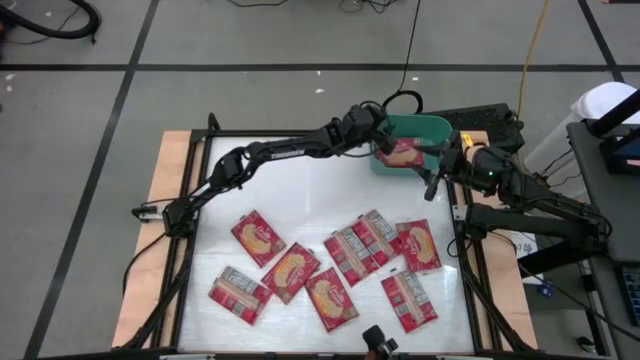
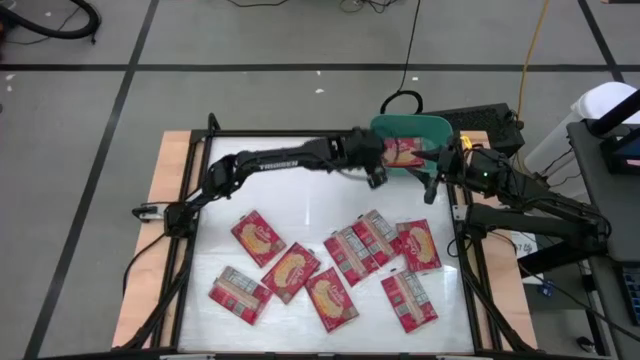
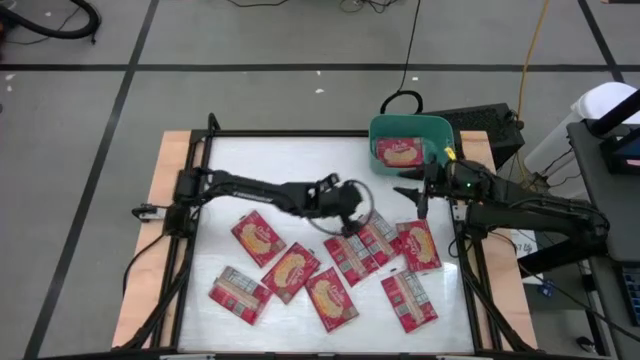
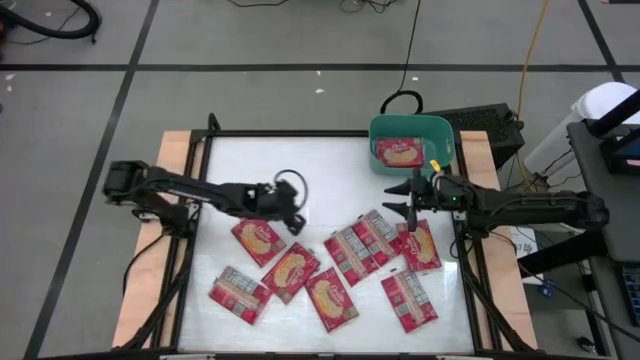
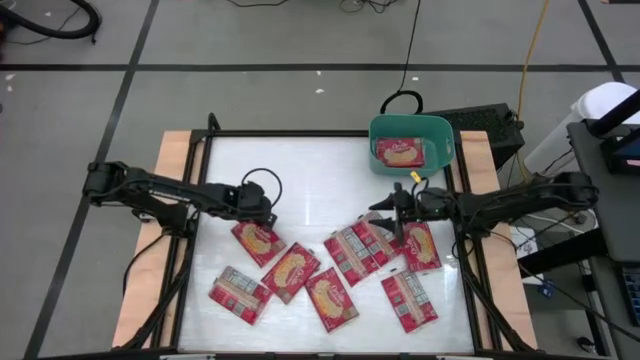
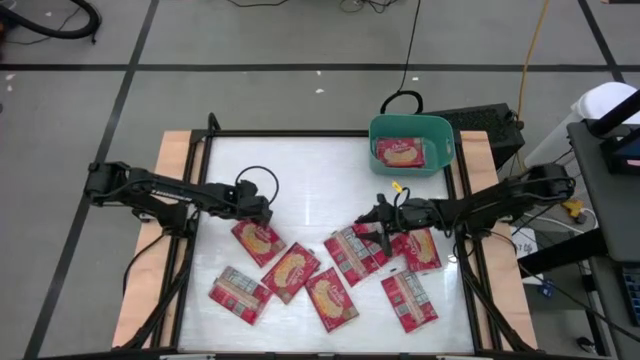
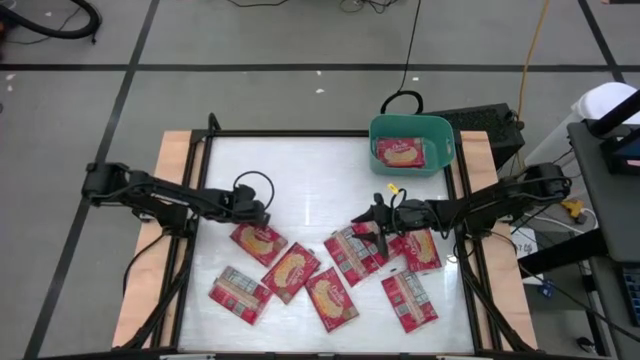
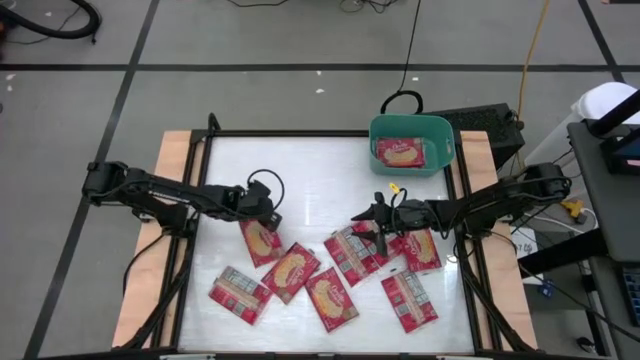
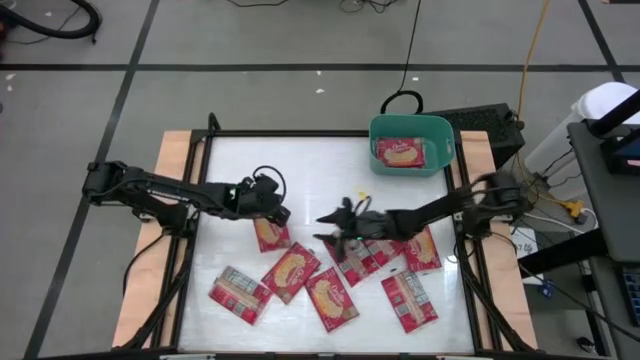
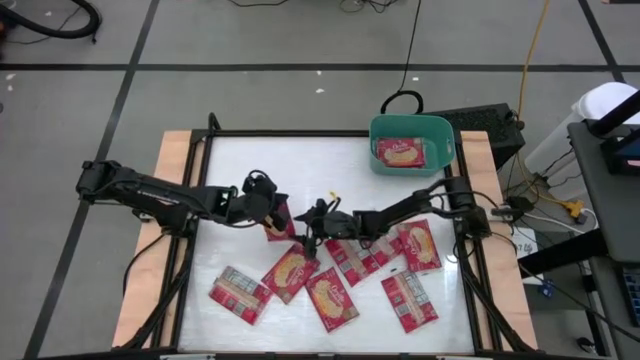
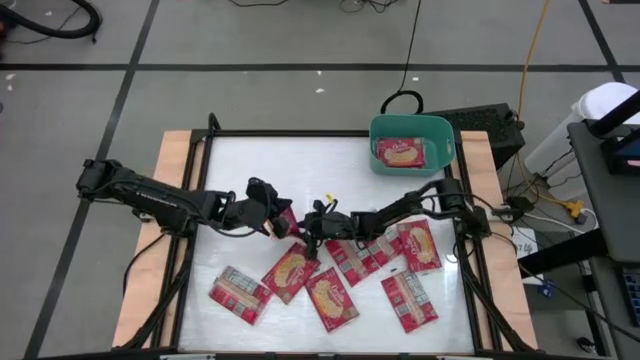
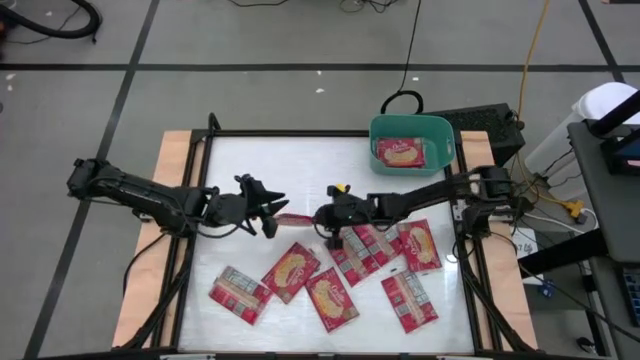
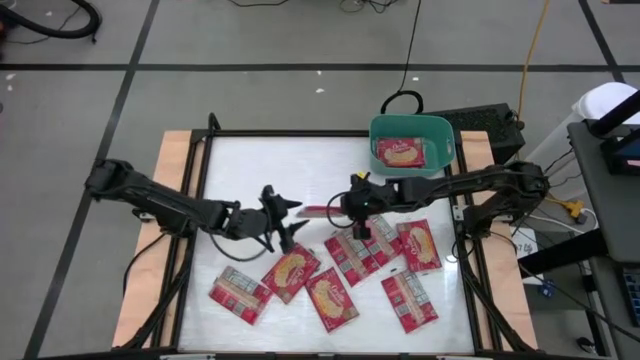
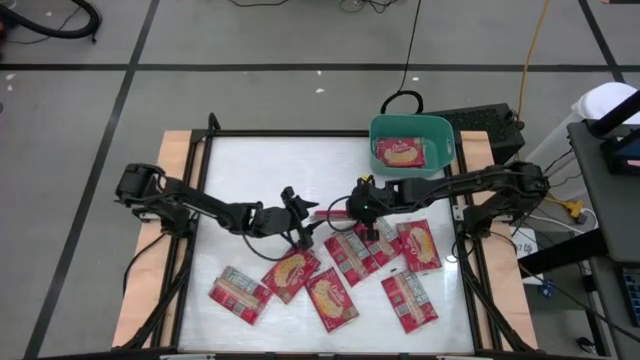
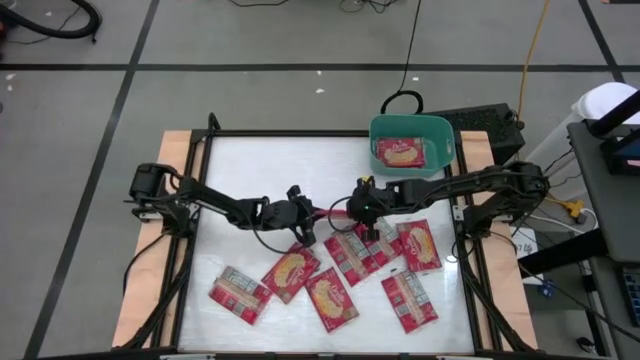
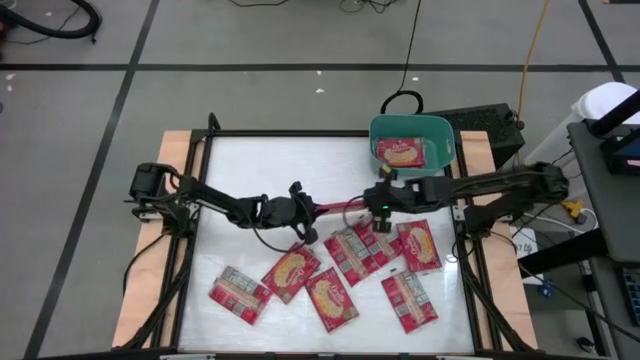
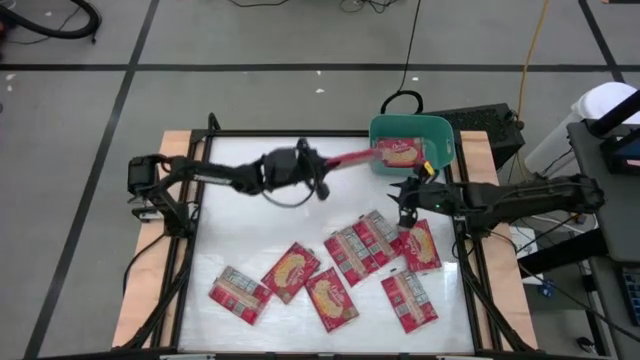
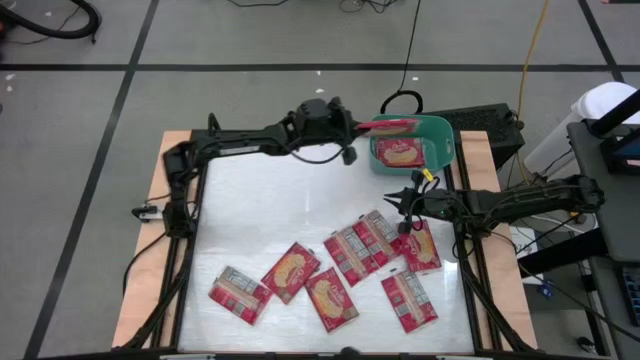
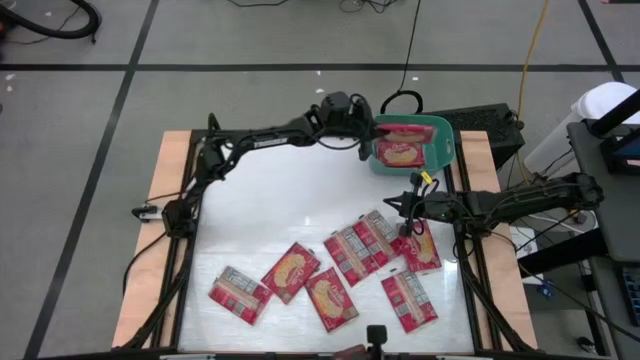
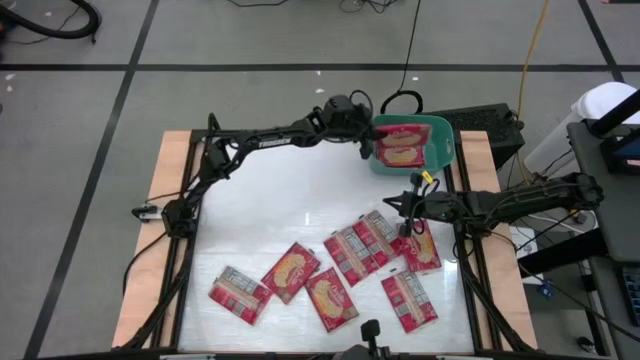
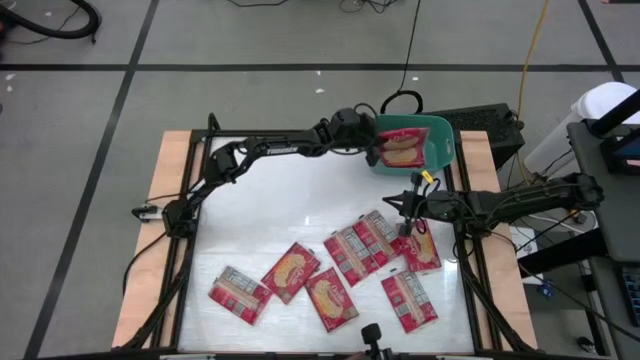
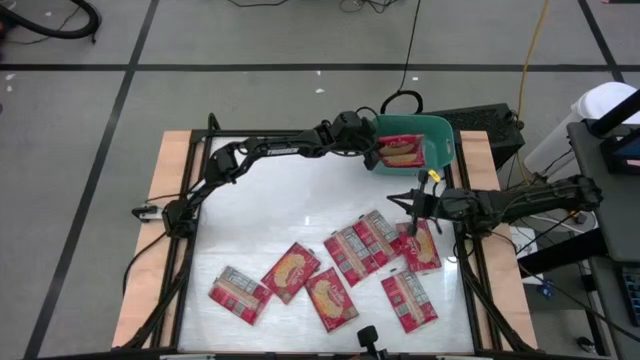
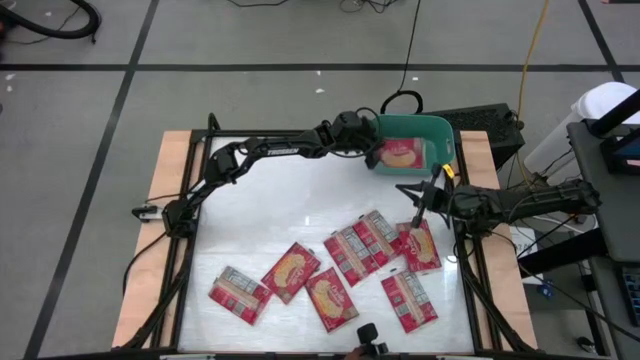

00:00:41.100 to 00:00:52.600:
Task: Sort popcorn bags into baskets
Put the red popcorn bag into the green bin

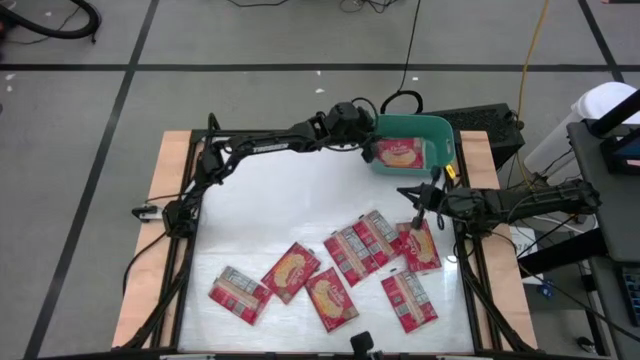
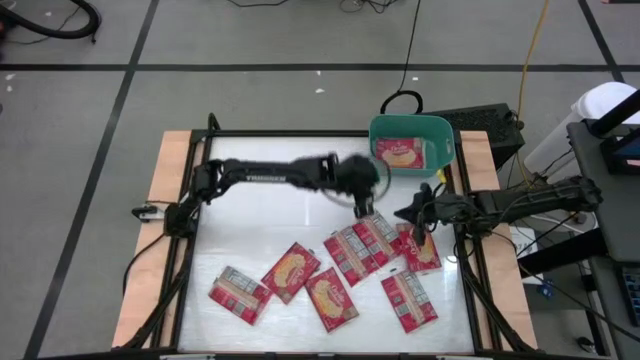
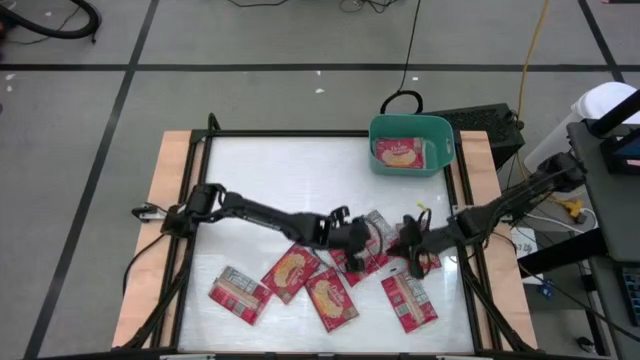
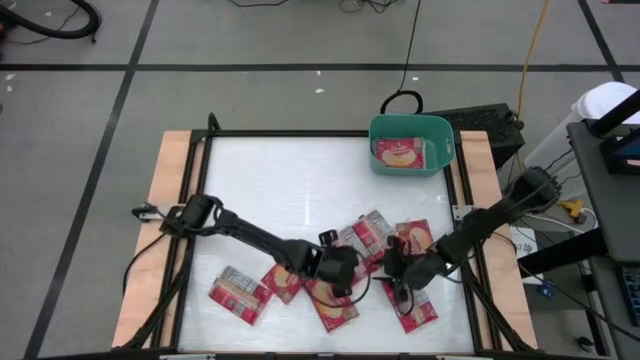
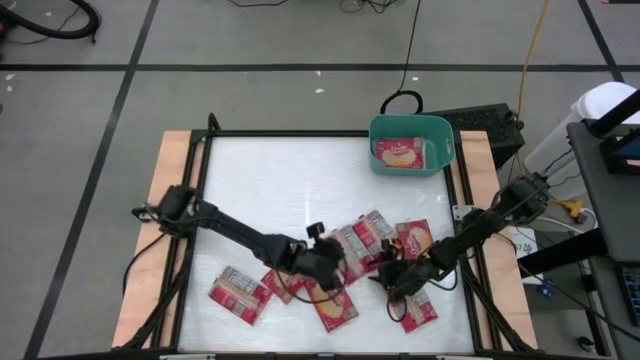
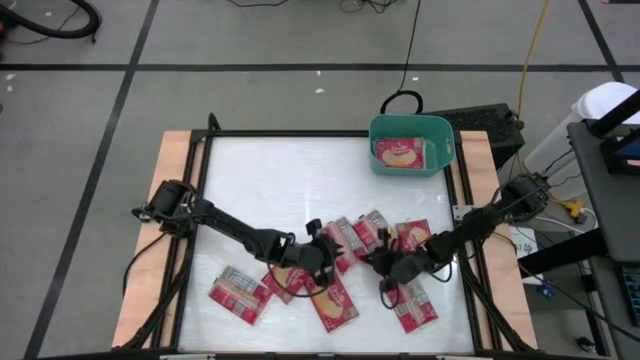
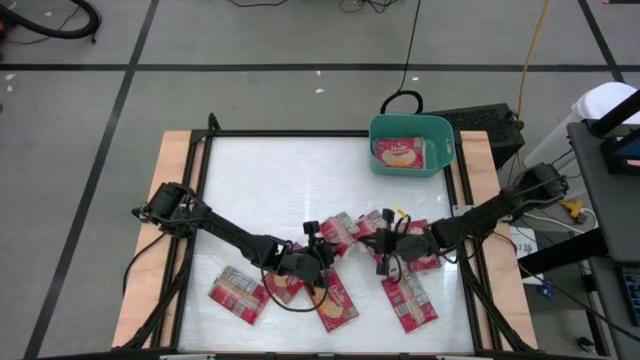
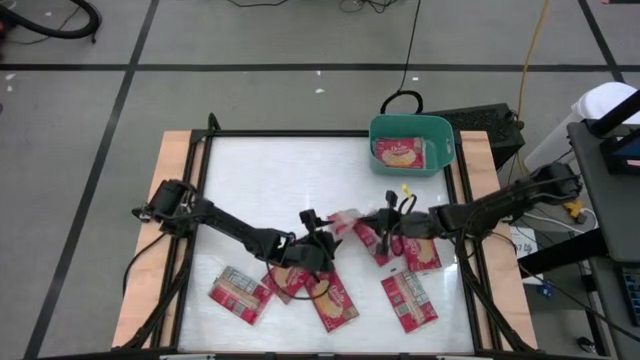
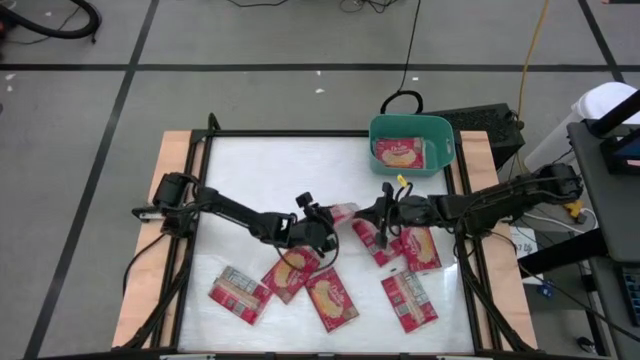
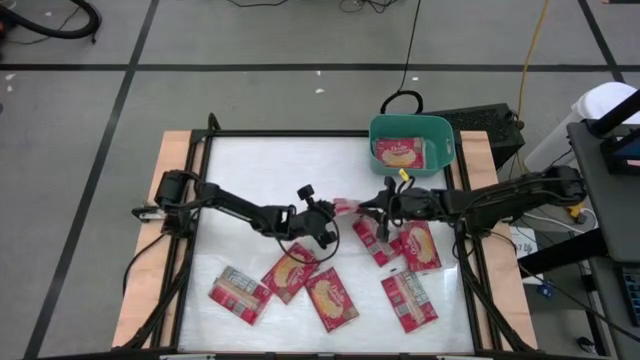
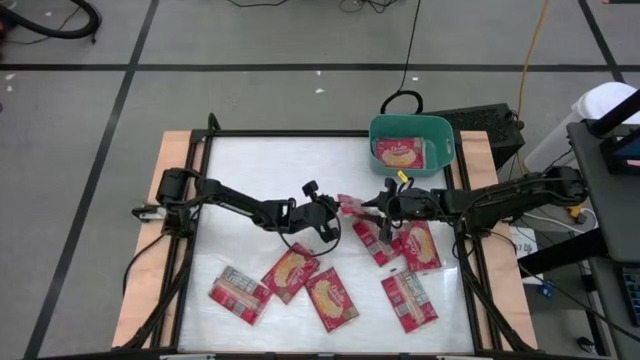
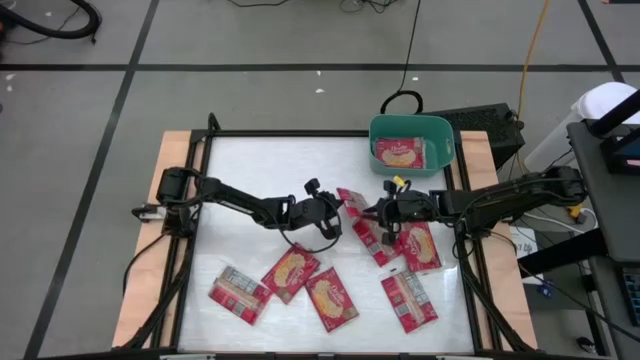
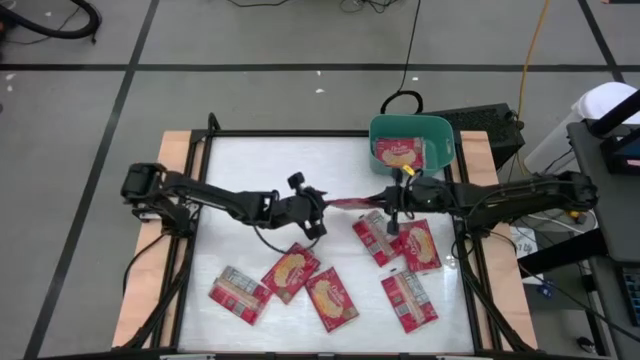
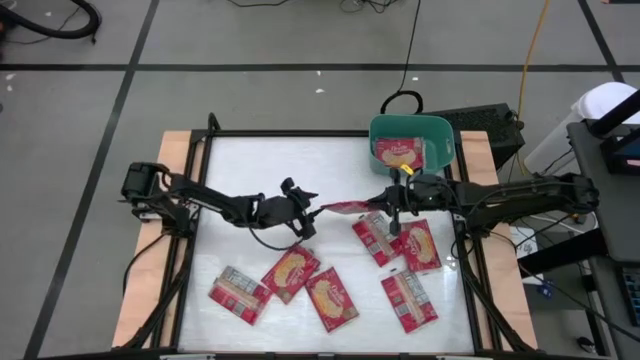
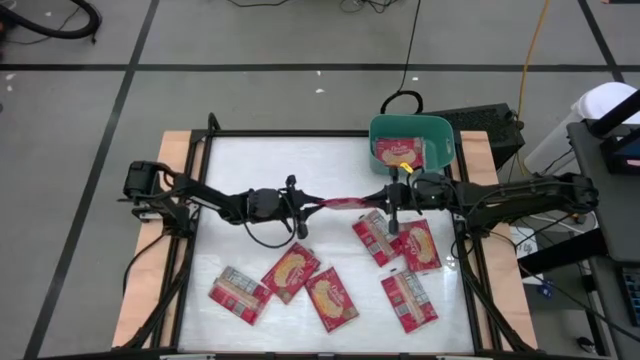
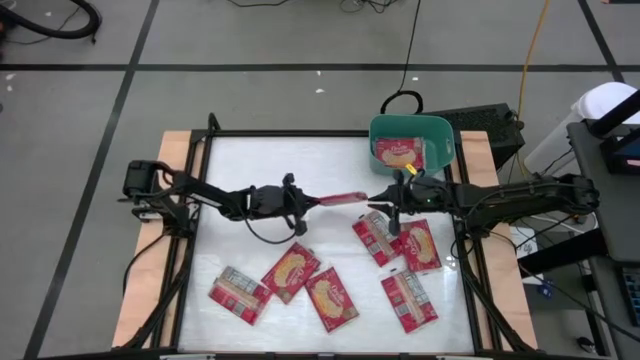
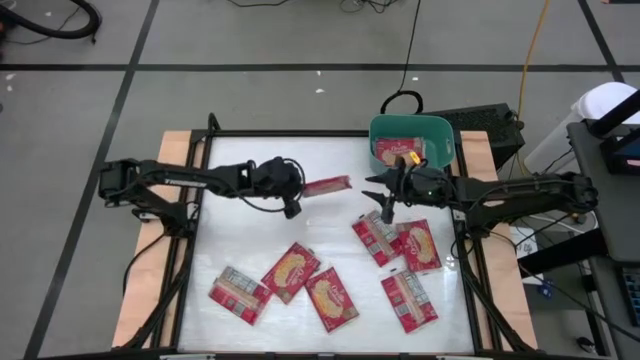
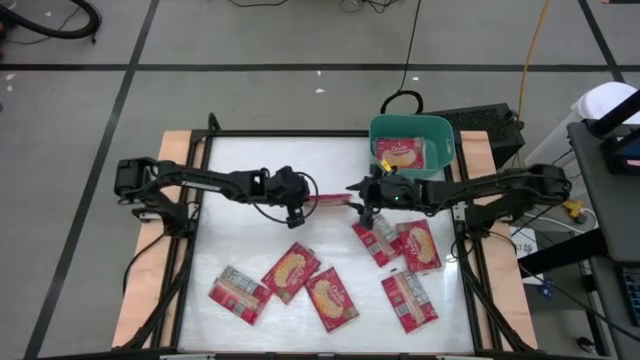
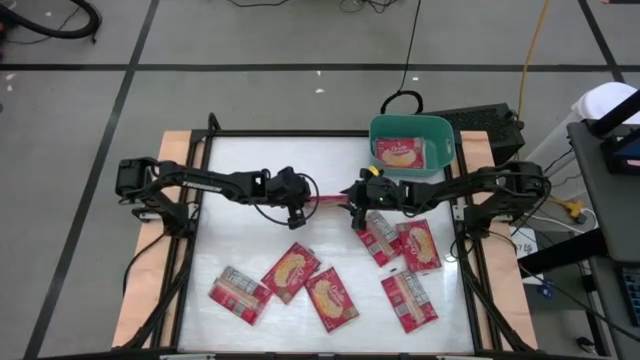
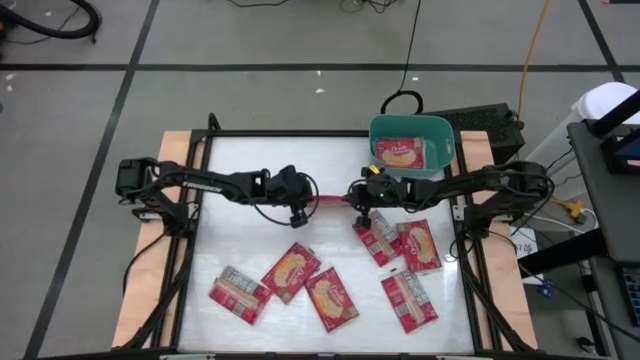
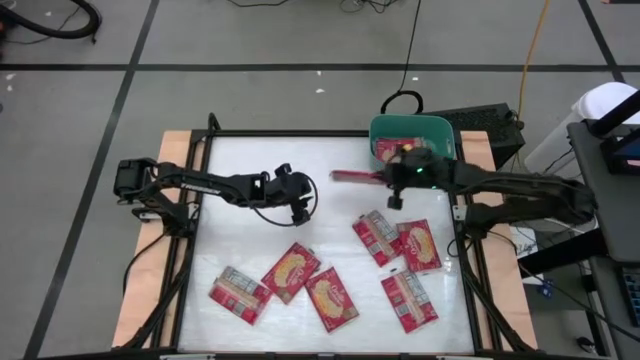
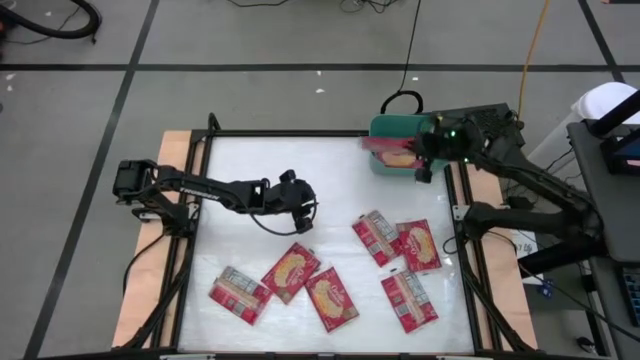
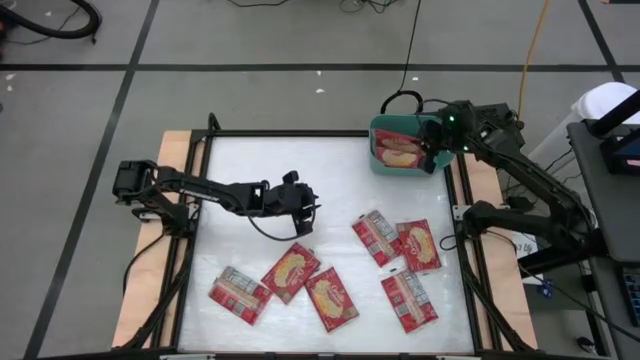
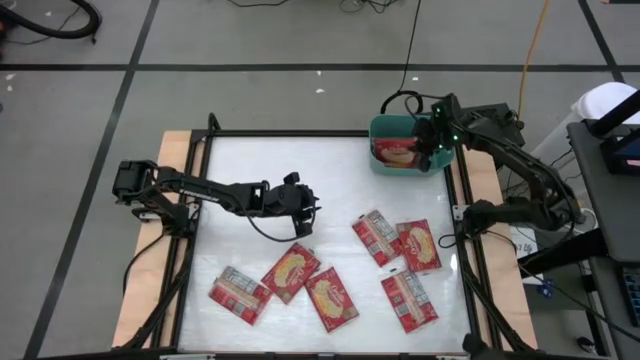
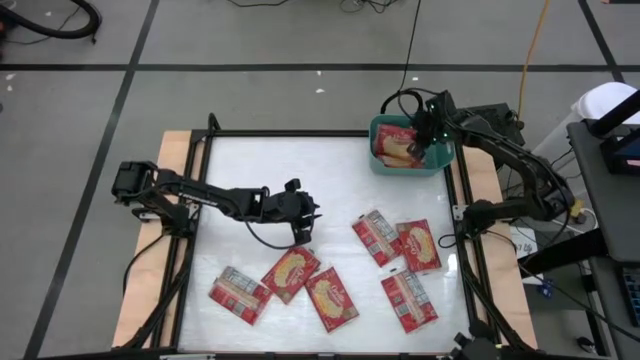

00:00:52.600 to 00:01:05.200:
Put the red popcorn bag into the green bin
